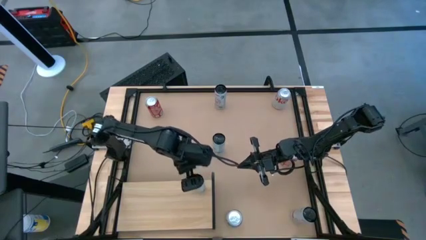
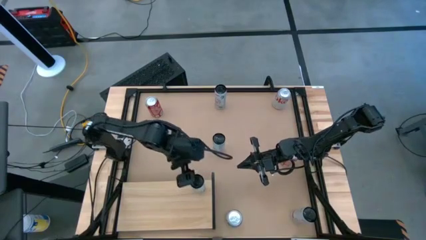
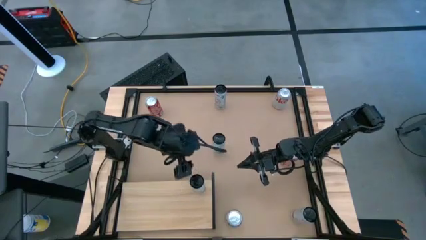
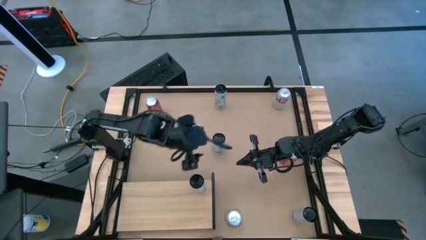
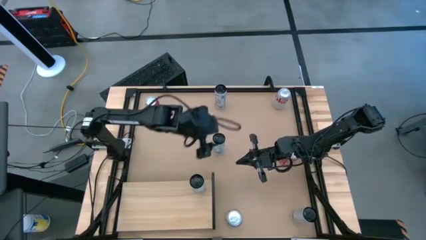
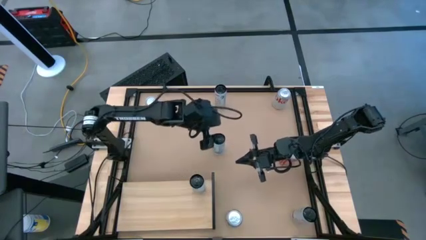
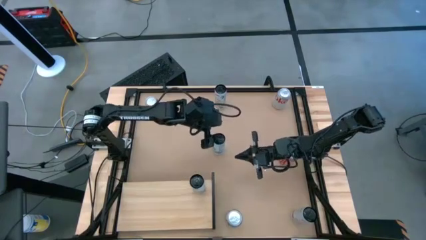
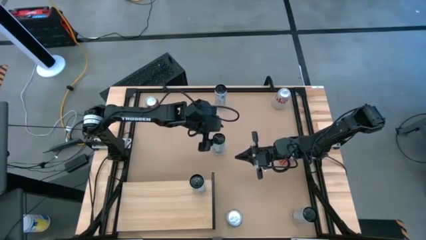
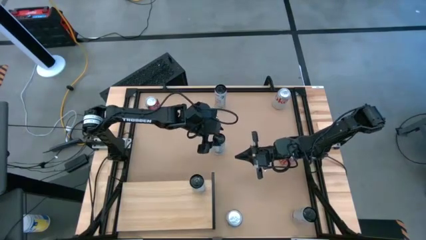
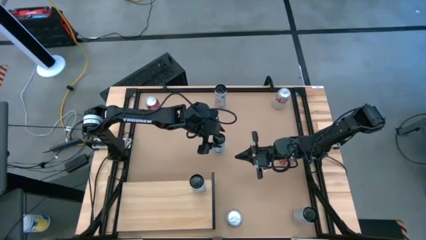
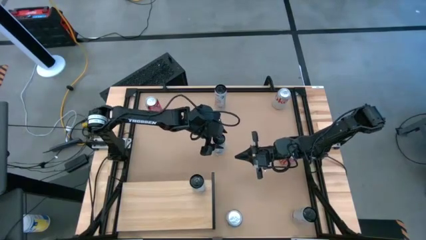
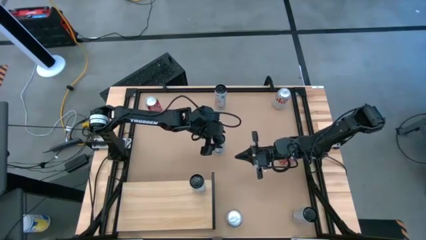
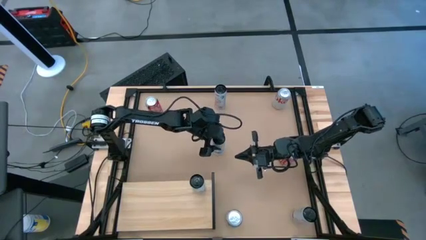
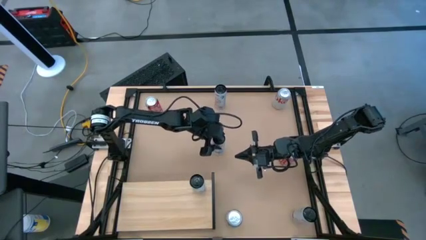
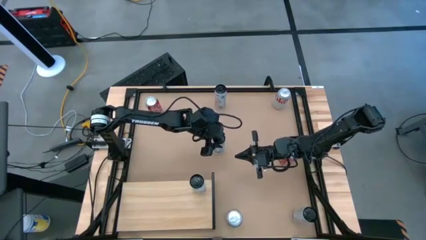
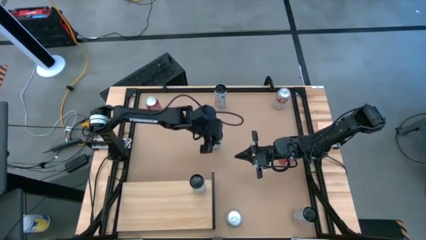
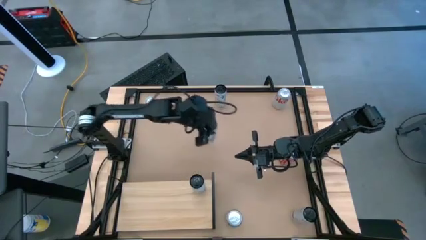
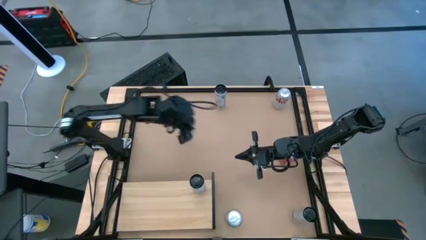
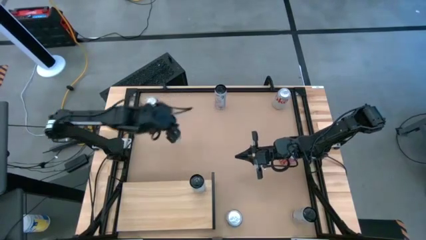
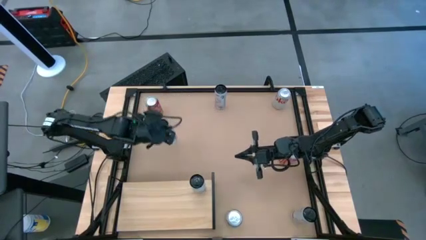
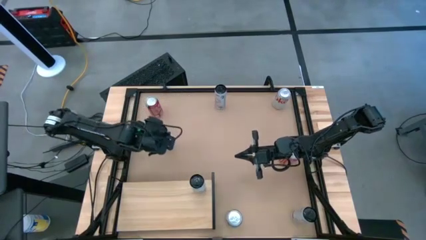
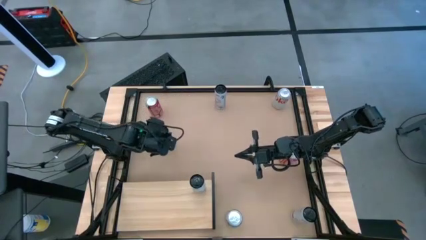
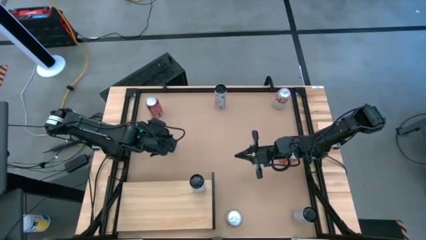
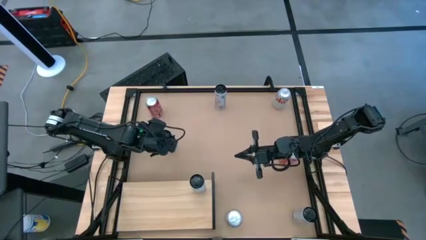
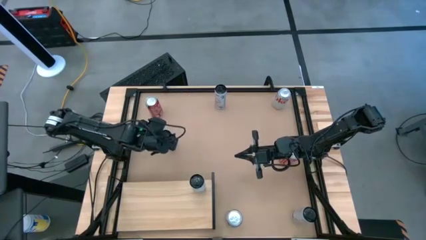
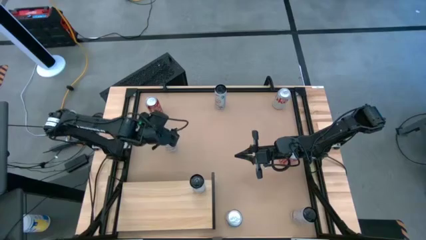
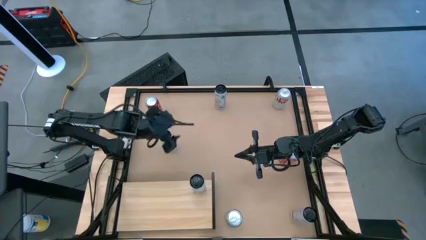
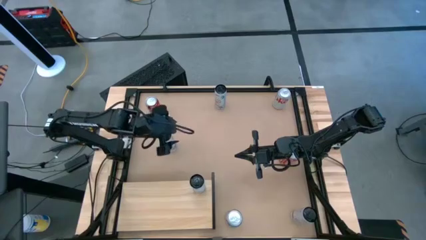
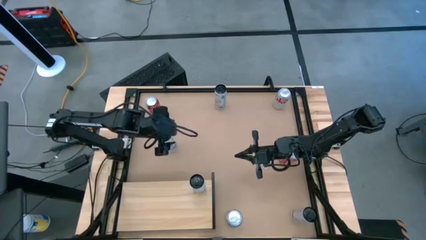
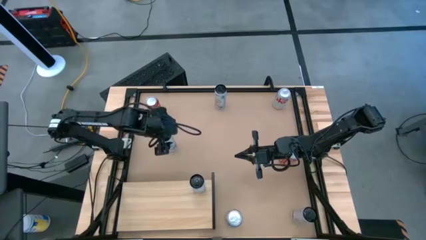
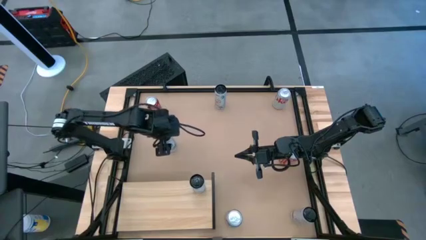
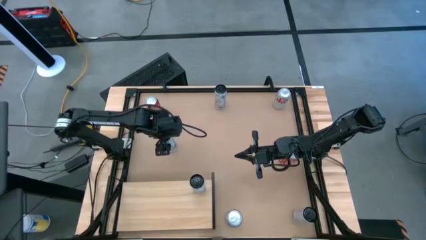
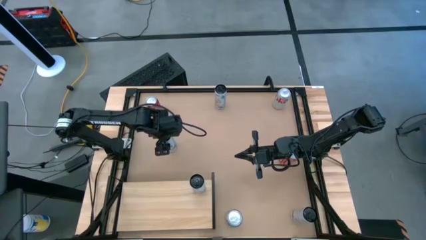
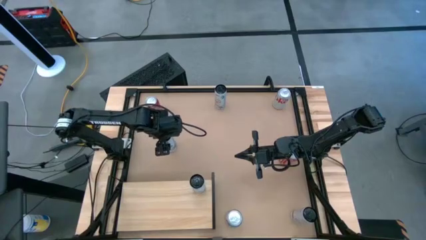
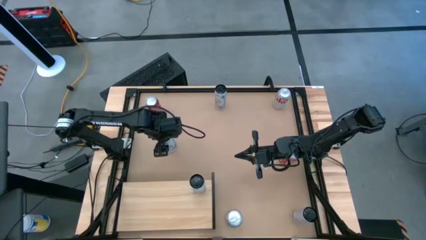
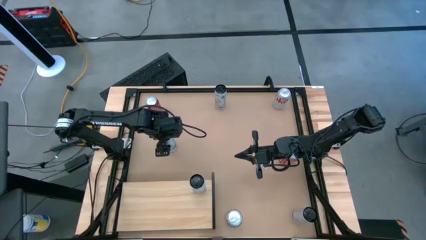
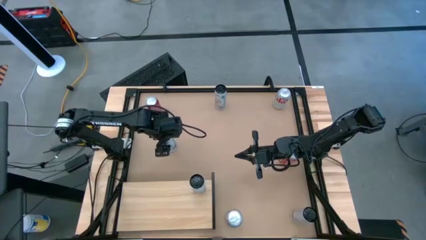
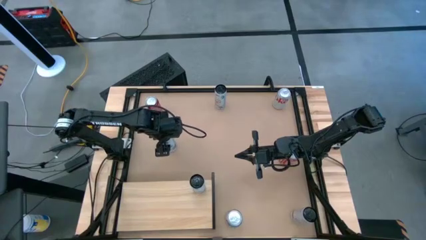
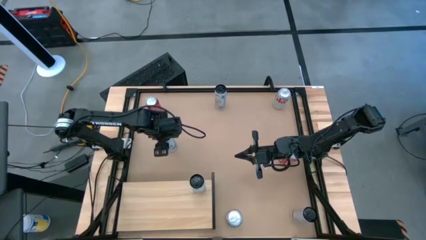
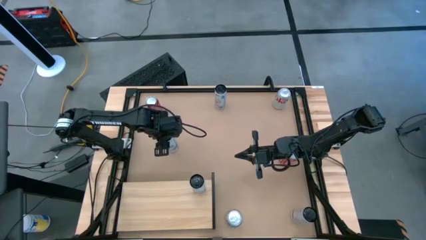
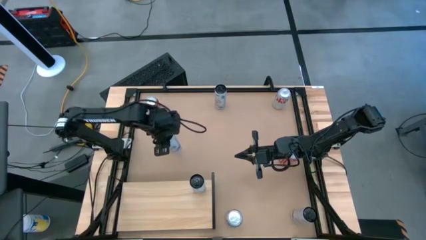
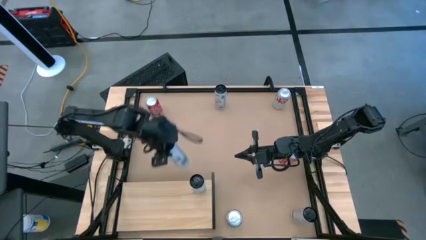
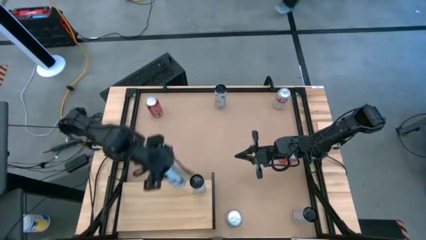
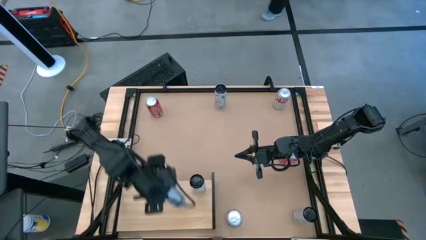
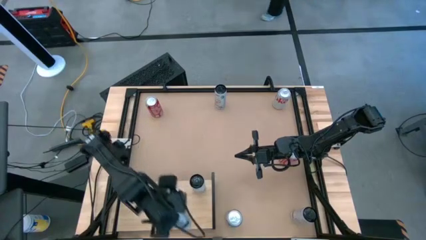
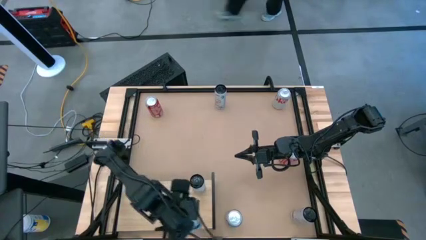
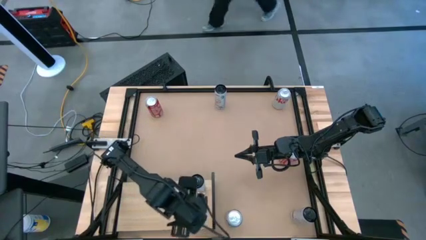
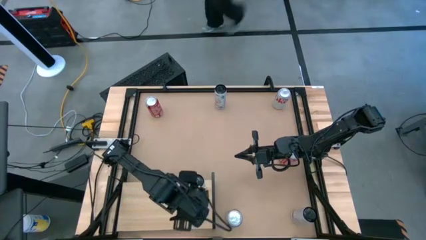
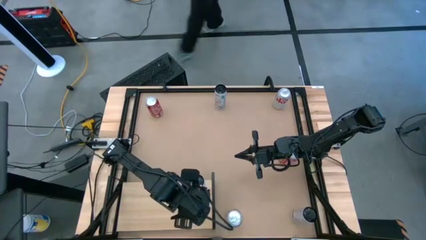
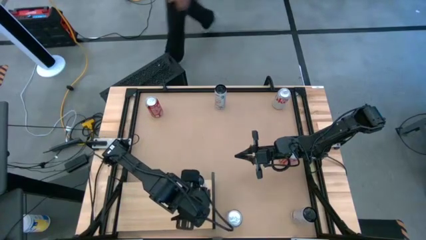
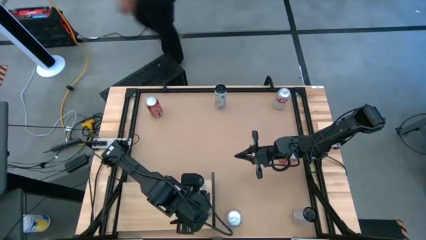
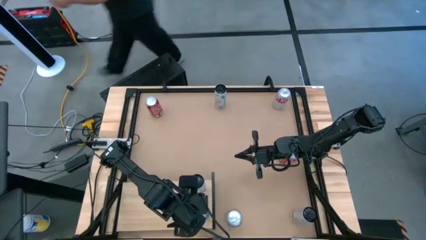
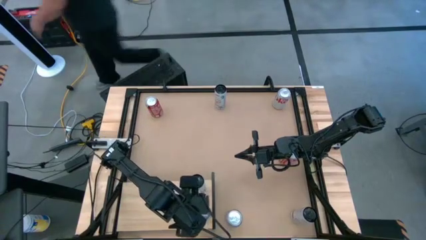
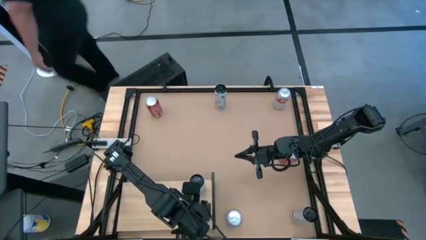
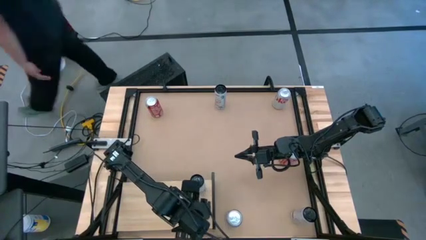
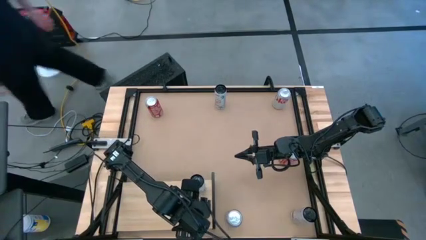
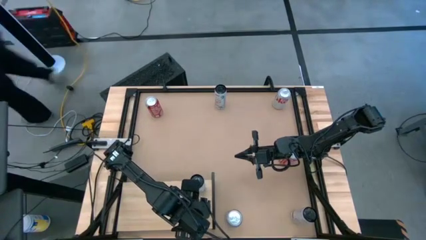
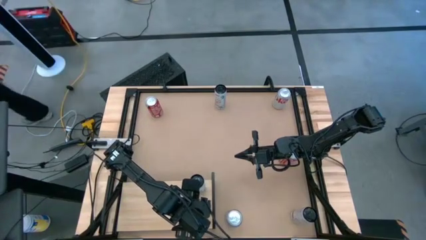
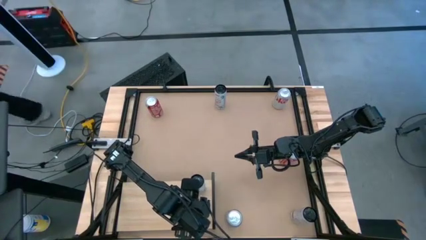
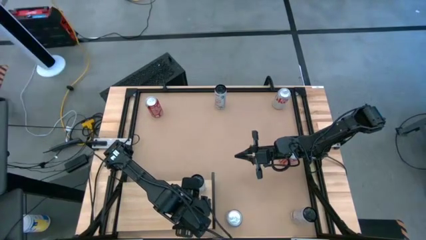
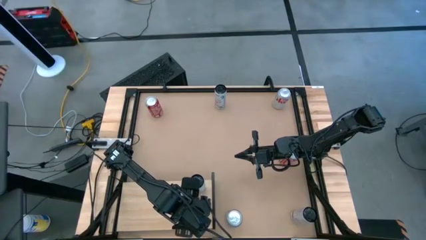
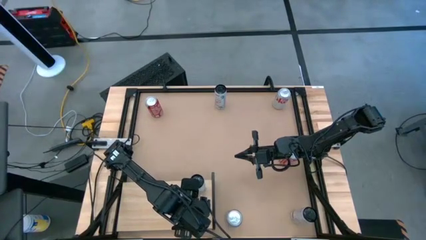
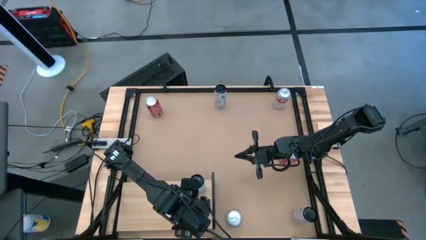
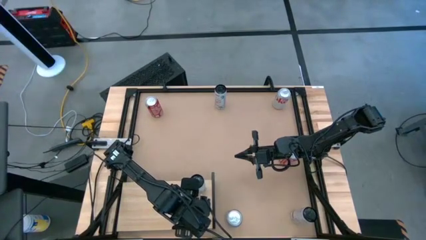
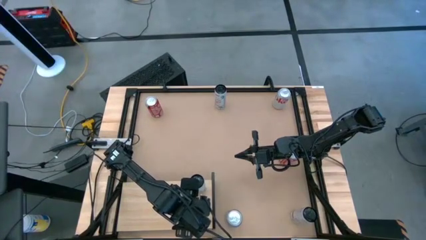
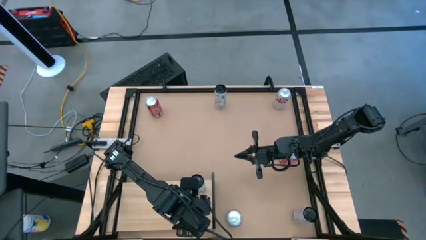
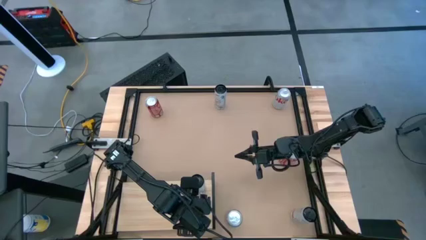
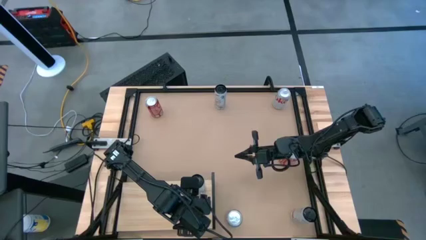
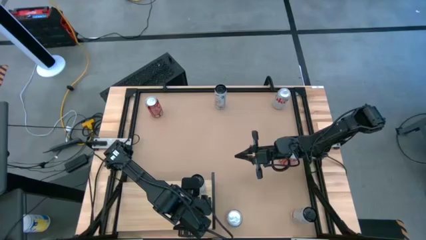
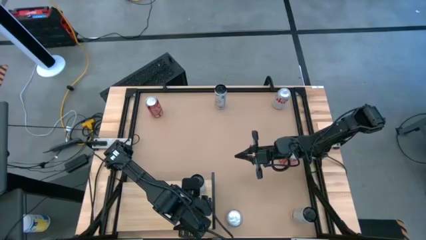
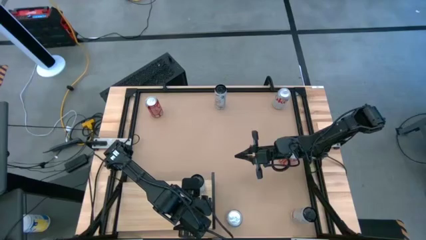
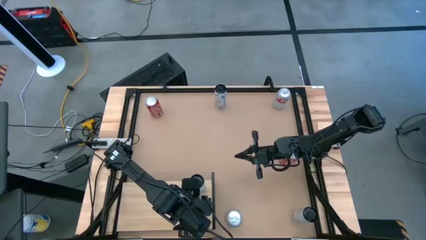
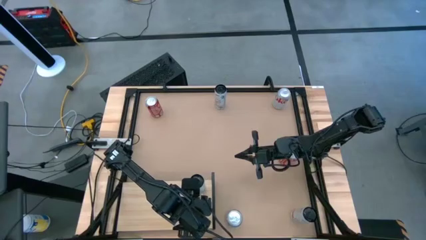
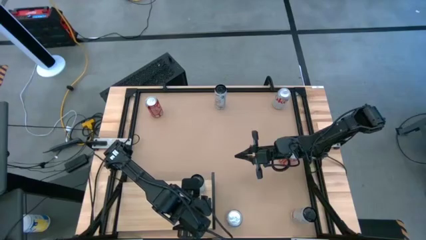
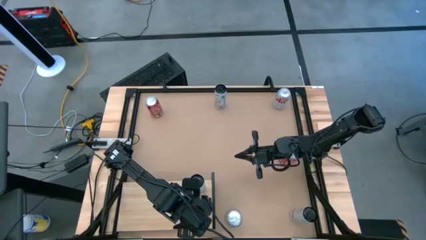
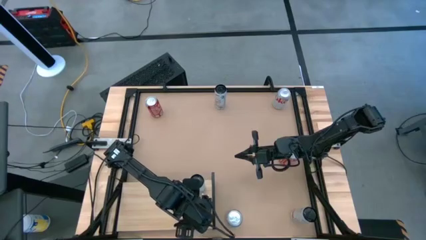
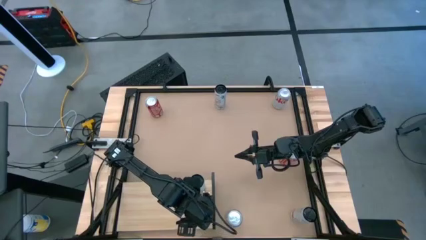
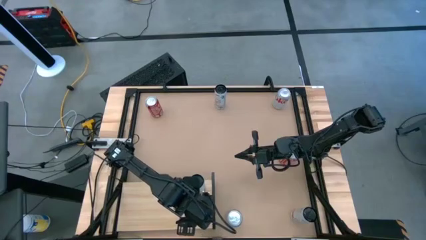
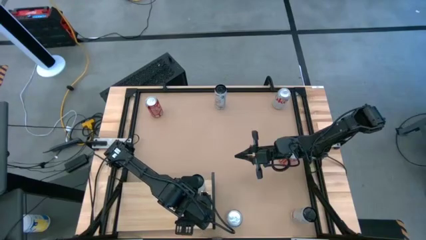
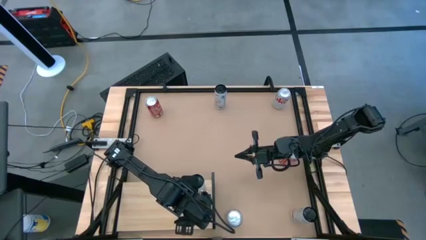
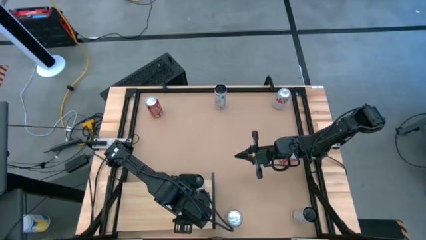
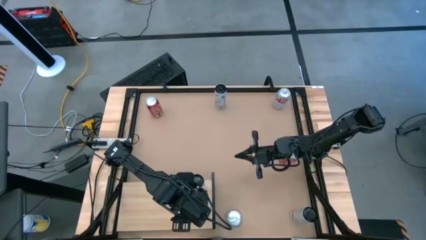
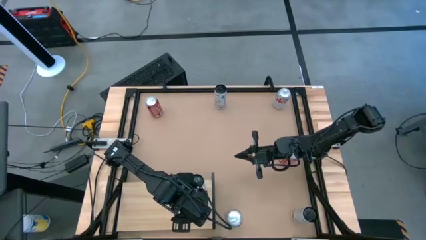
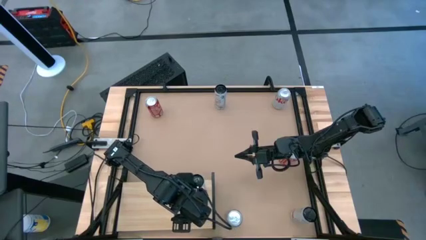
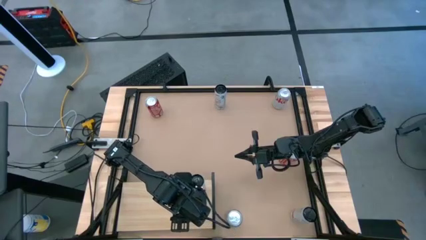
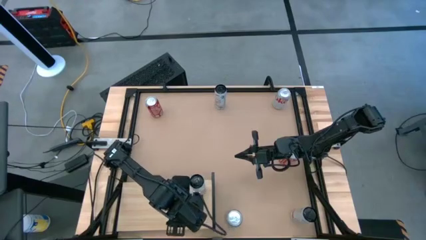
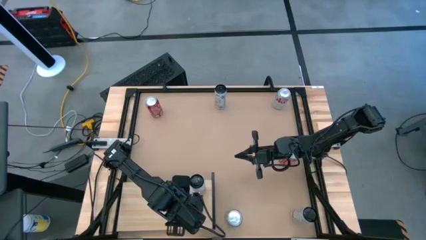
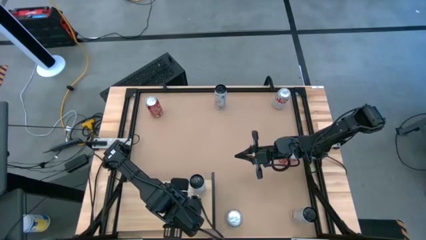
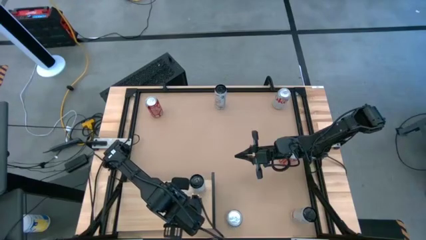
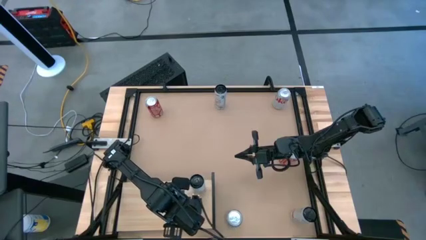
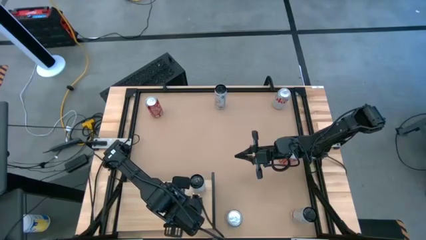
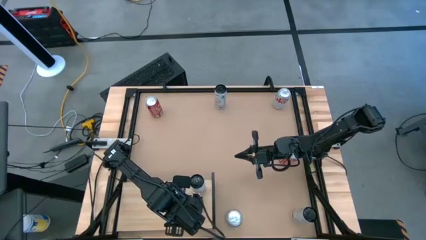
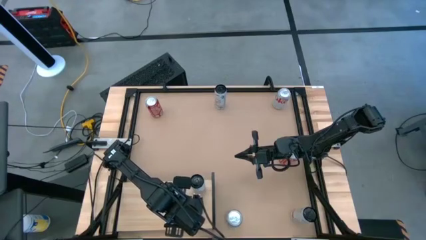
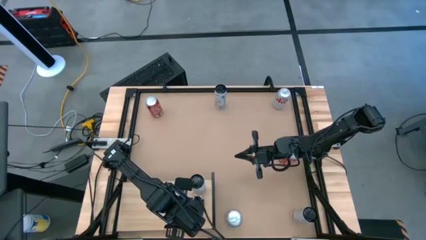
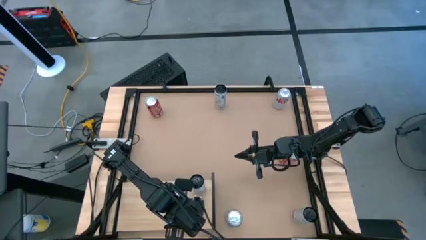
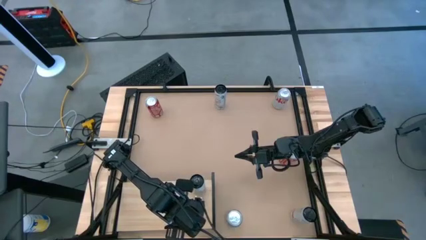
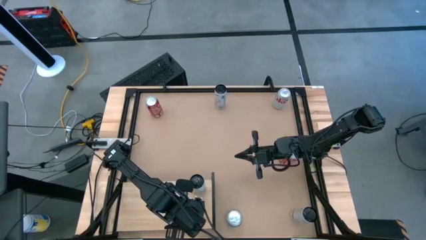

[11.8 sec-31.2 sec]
Task: Place canned beverage on shelf
Put the white and blue soda can on the shelf aligned with the other white and blue soda can
